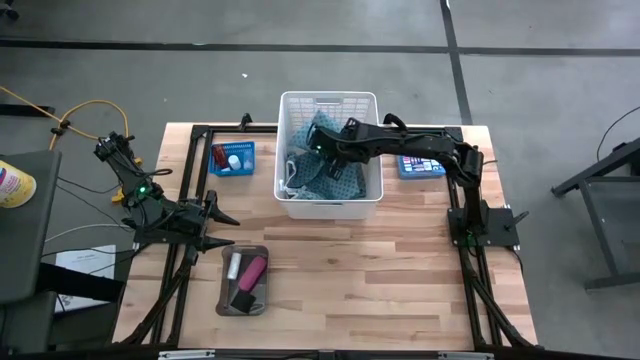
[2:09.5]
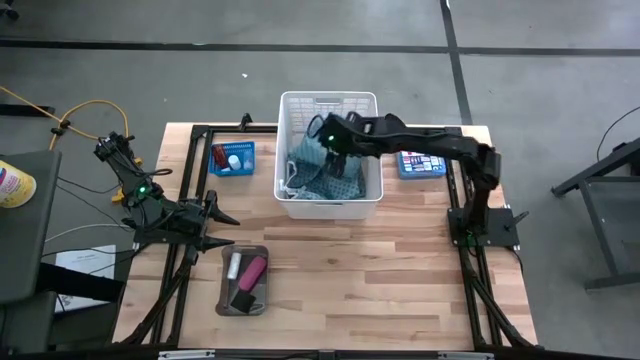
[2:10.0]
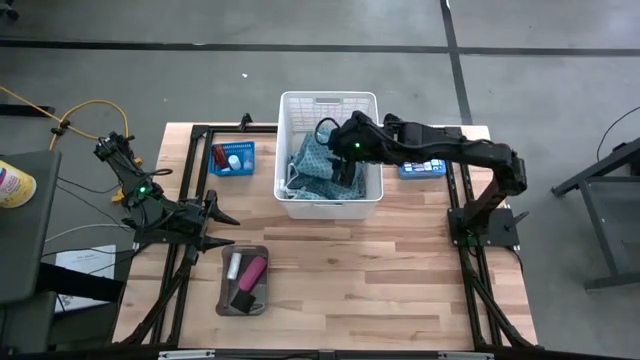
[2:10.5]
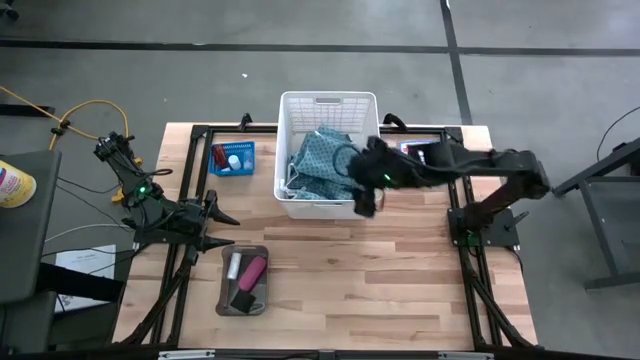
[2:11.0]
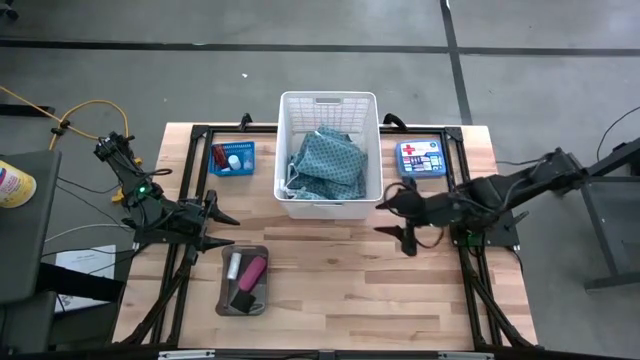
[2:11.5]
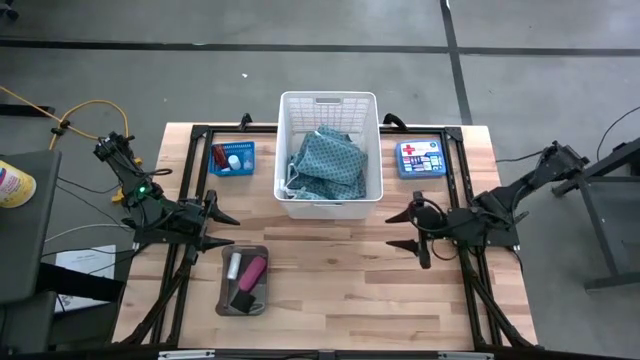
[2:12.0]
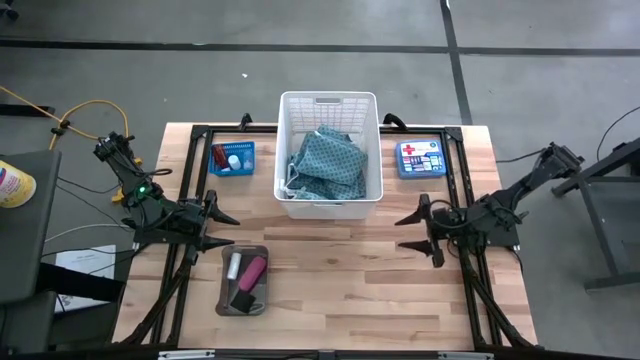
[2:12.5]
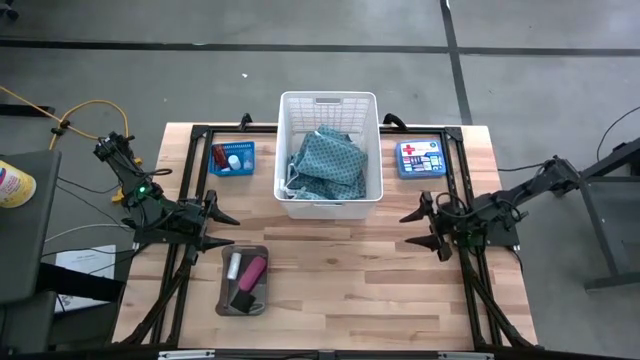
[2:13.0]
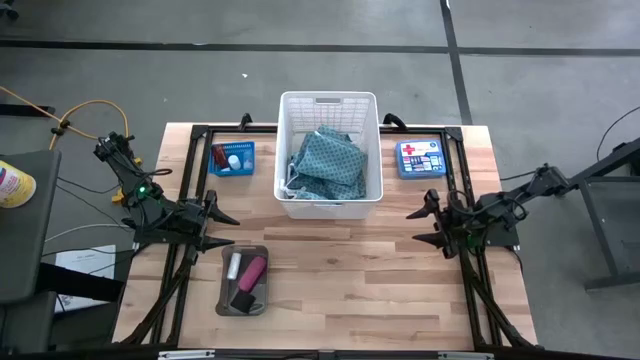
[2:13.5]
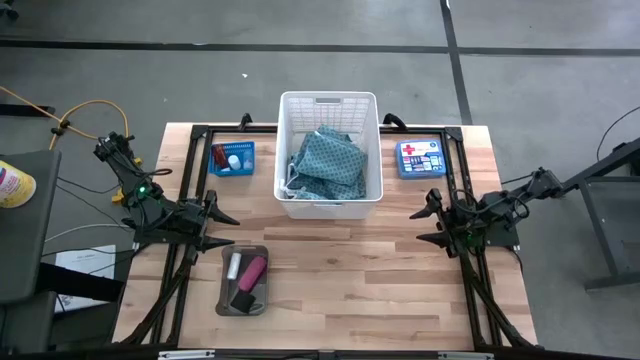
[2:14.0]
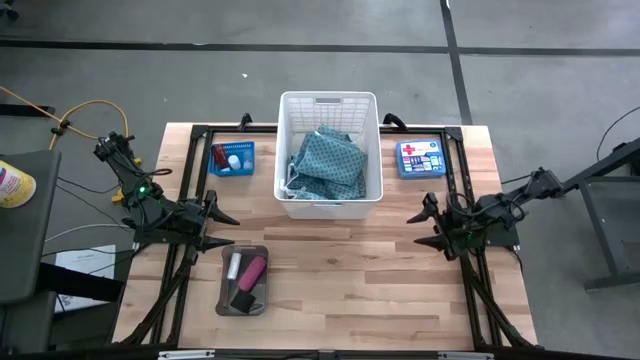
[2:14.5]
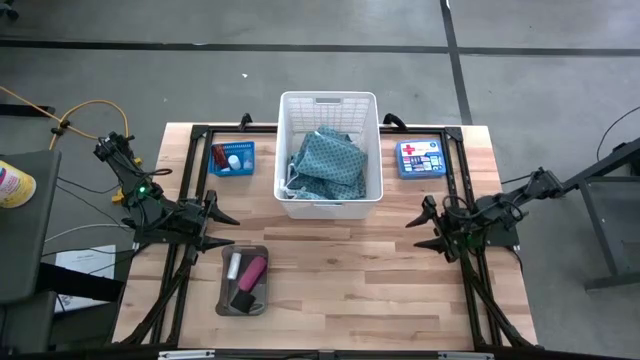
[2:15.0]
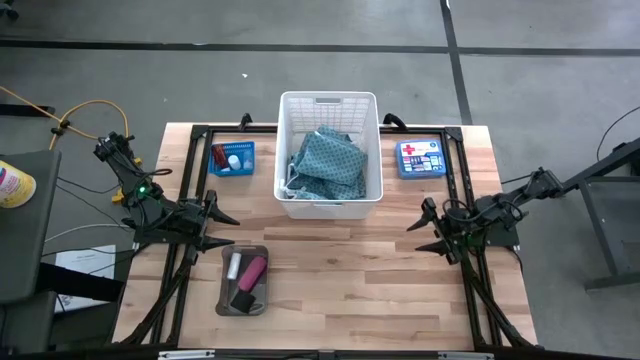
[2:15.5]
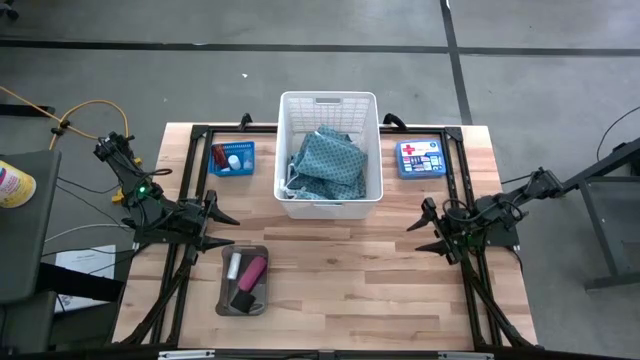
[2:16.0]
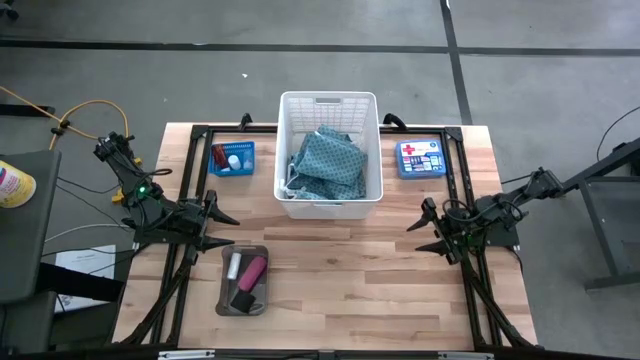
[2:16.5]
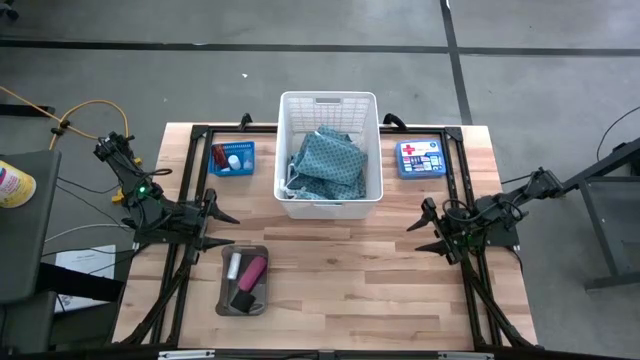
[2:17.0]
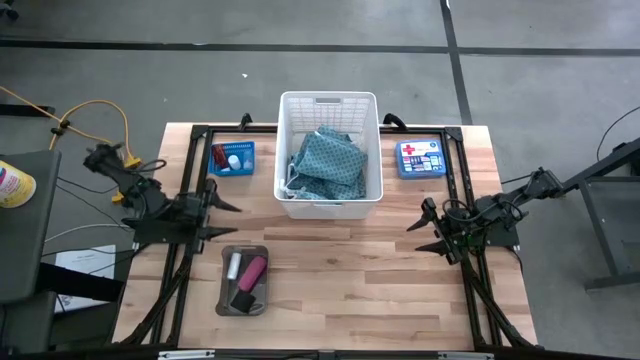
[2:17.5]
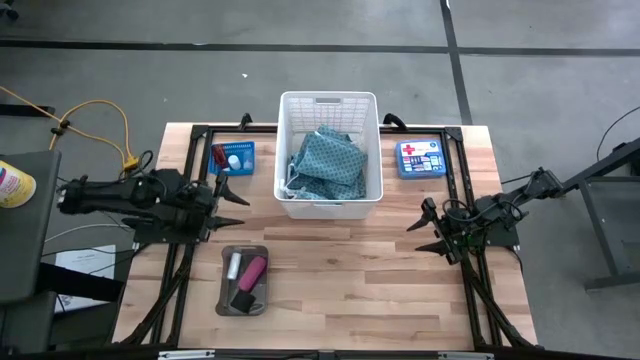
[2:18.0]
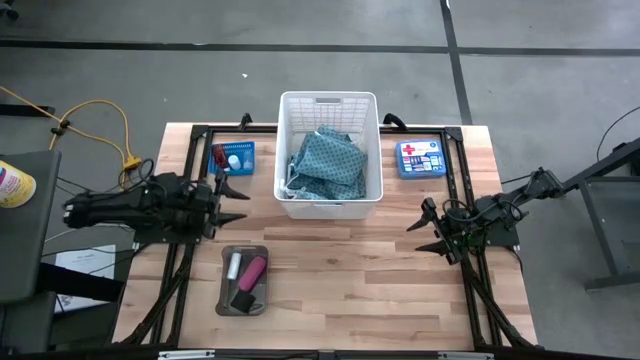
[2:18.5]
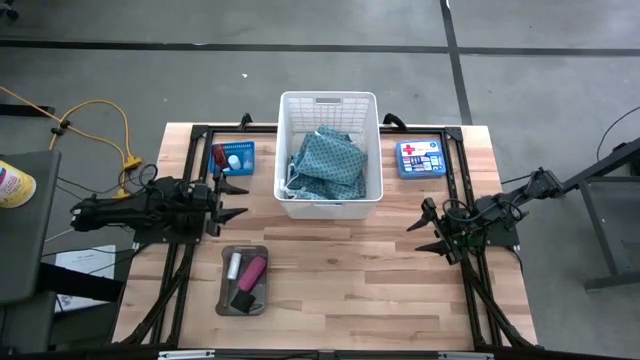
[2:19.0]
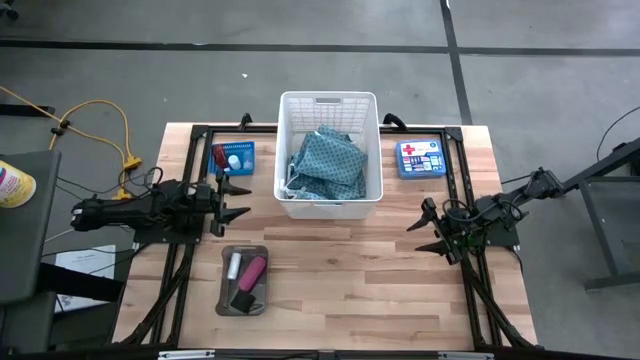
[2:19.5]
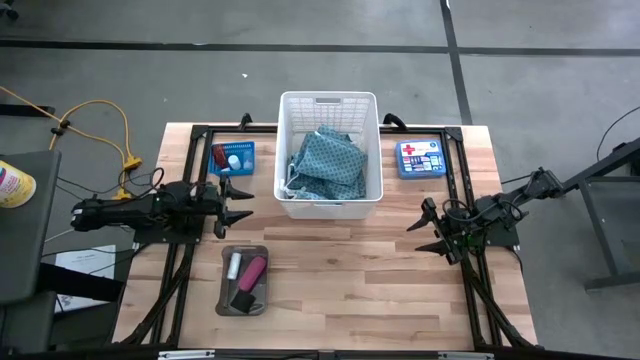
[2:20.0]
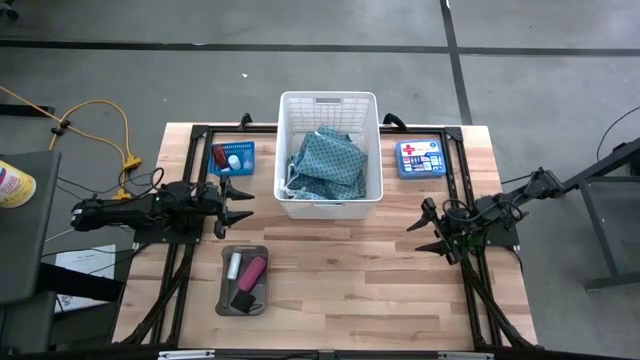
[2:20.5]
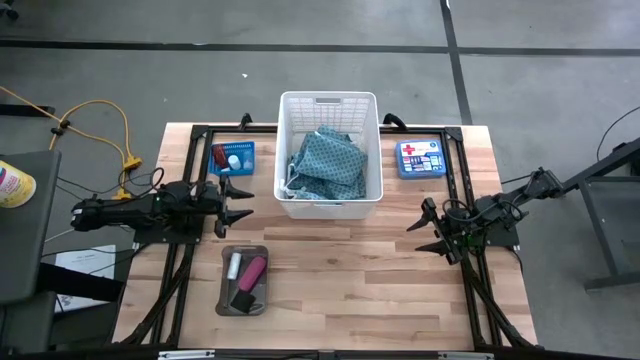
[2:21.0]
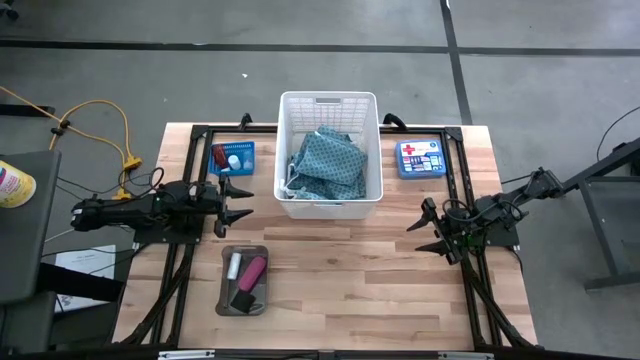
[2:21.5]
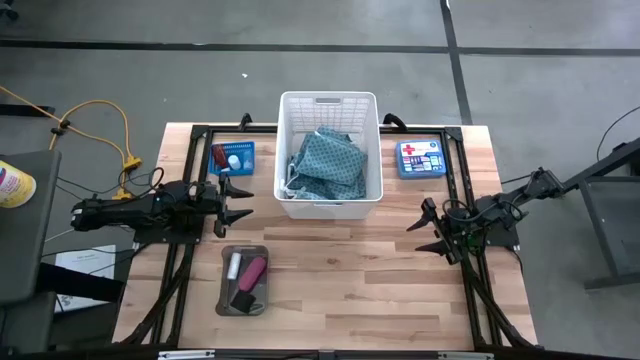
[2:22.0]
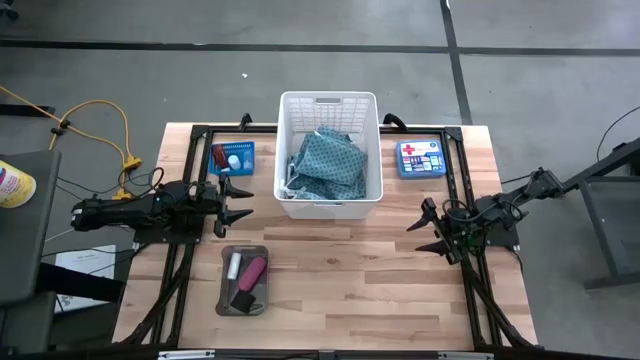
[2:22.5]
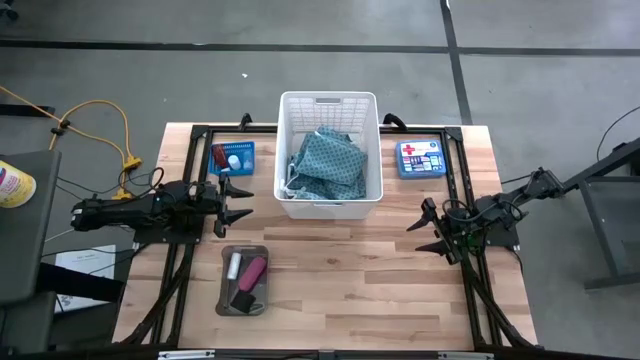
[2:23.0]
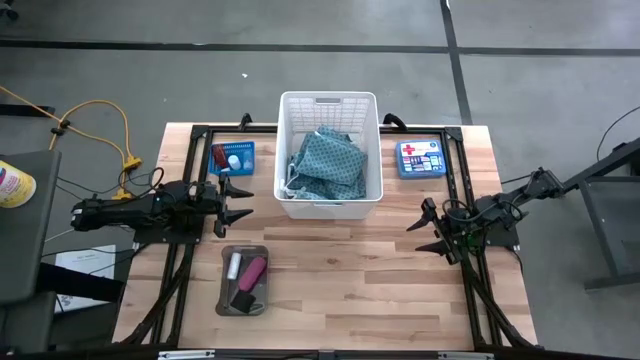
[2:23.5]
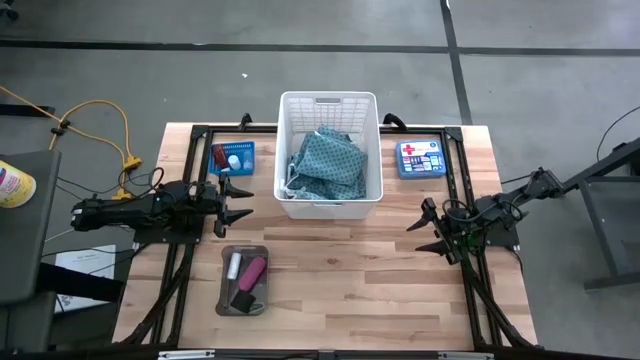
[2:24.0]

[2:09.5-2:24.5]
Task: Pick & place medical supplies in basket/bin
Return to Home Position

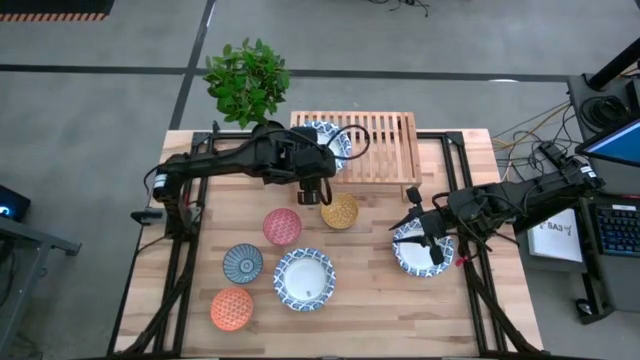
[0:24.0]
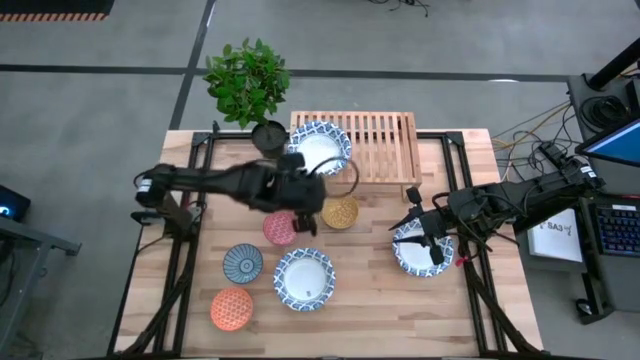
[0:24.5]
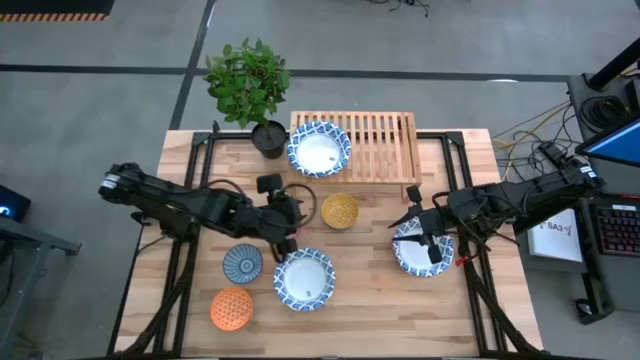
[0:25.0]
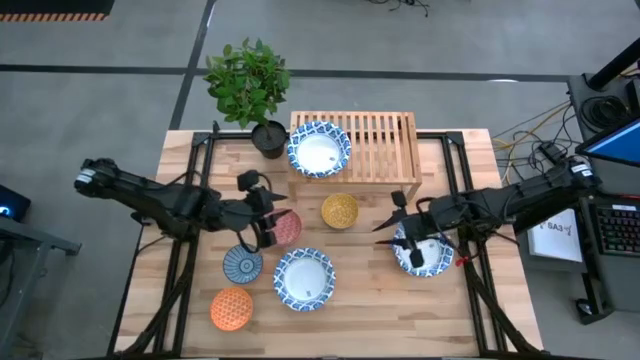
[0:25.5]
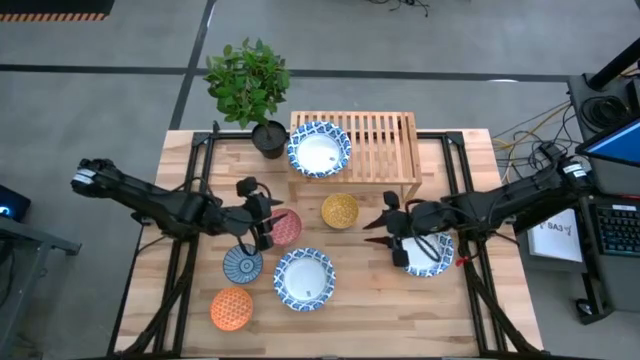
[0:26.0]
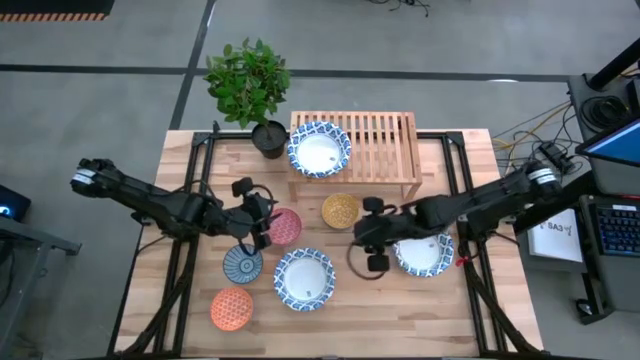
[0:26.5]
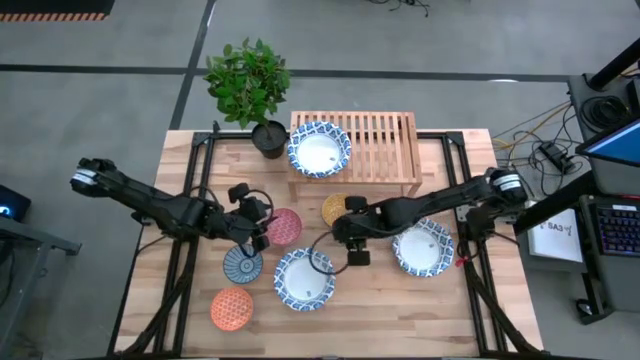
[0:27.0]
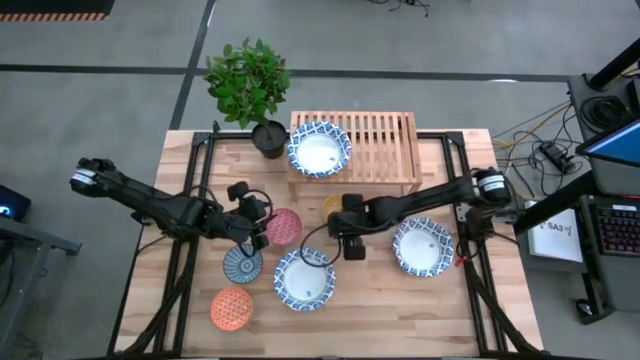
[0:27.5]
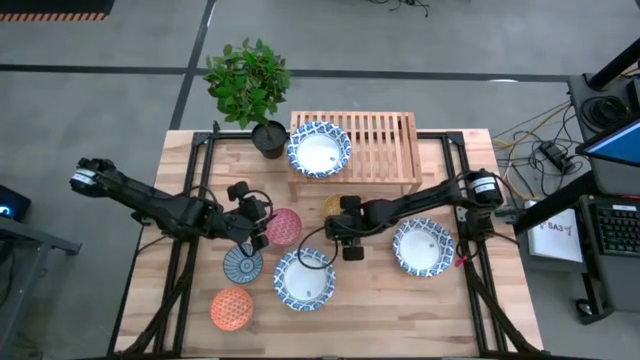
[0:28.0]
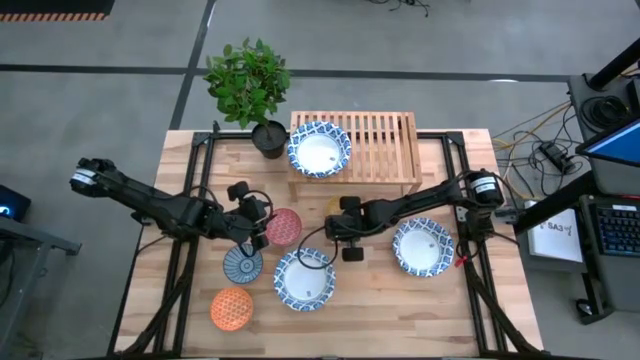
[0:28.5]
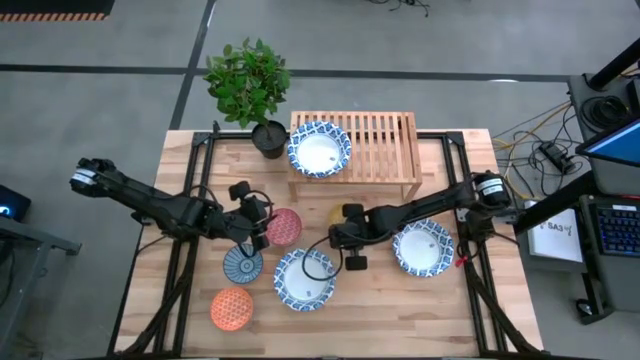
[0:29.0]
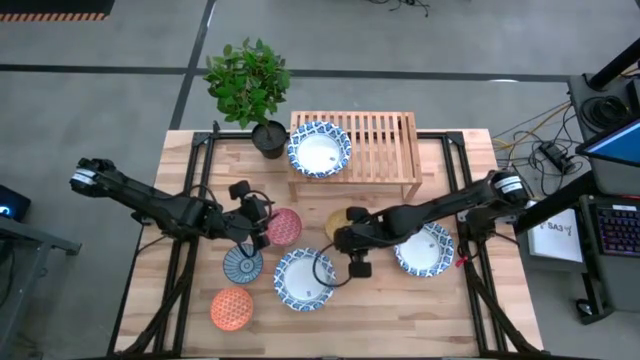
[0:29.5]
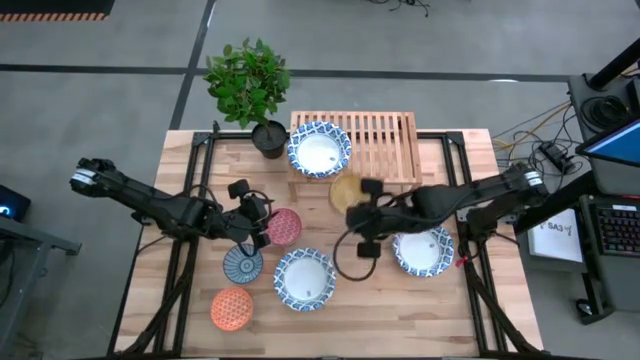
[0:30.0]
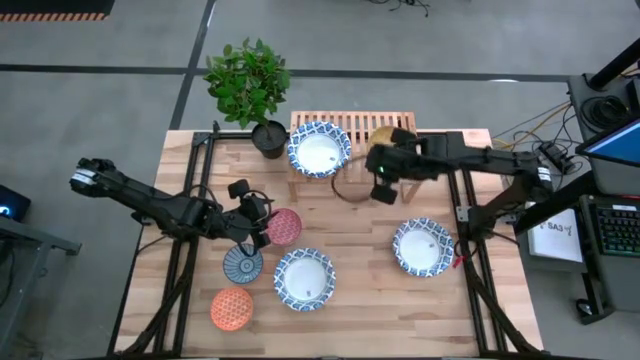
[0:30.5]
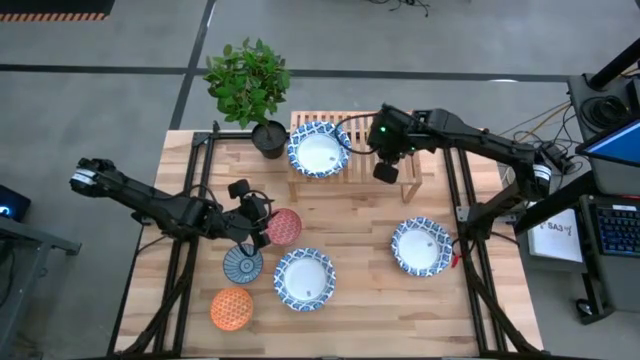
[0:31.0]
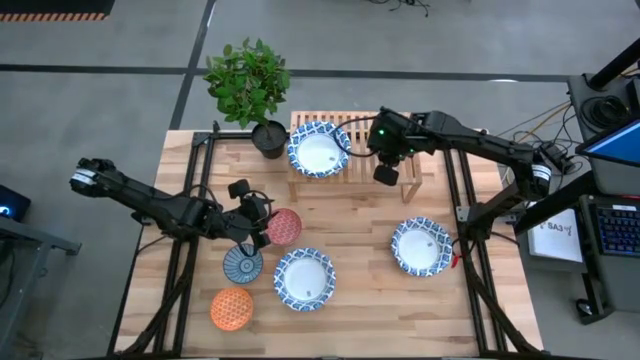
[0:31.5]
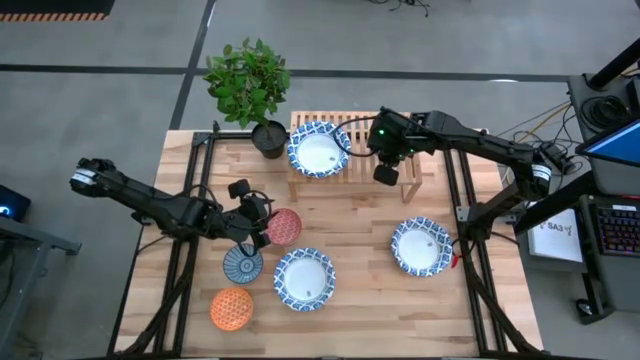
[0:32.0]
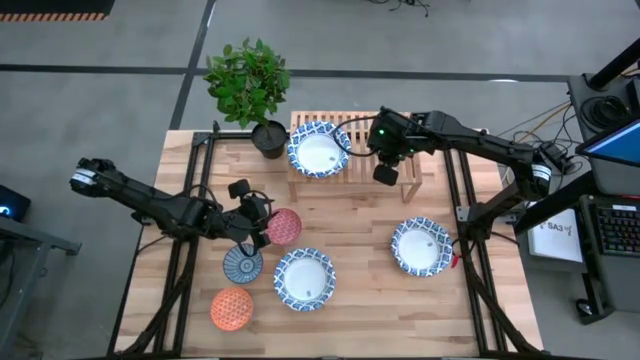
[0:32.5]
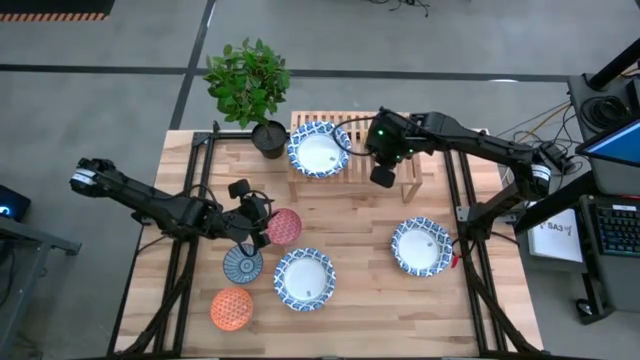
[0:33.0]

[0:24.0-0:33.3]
Task: Place and stack bowls onto a shelf
Put the yellow bowl on the shelf
